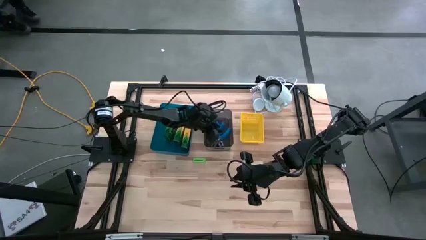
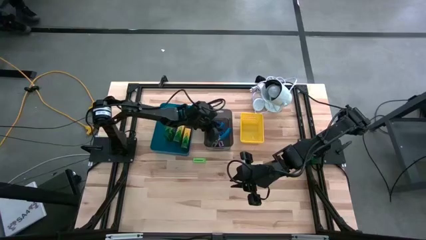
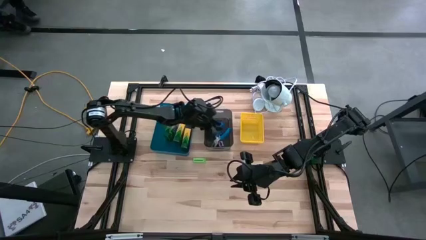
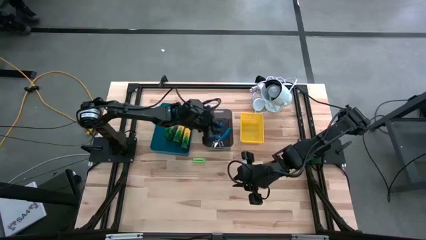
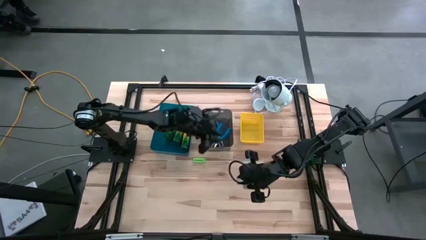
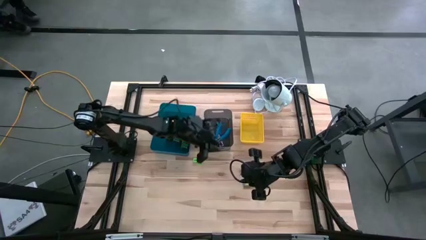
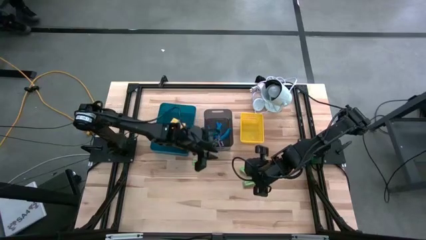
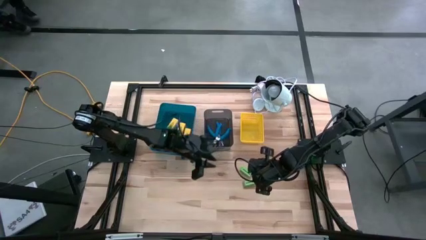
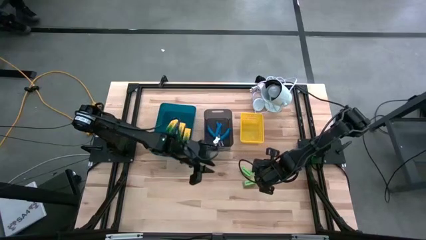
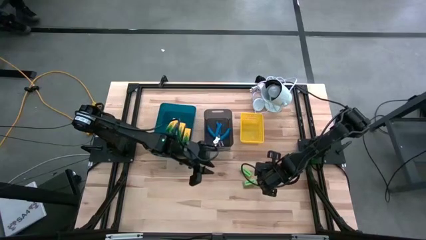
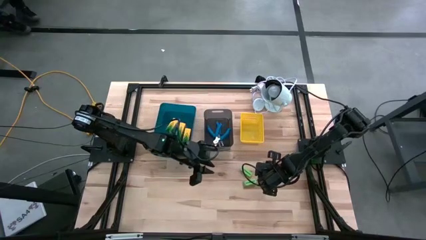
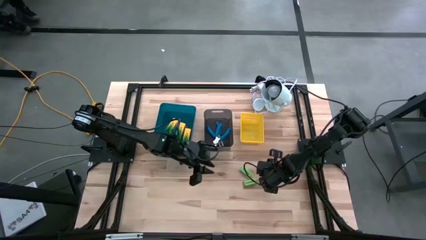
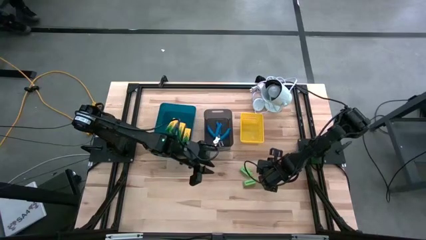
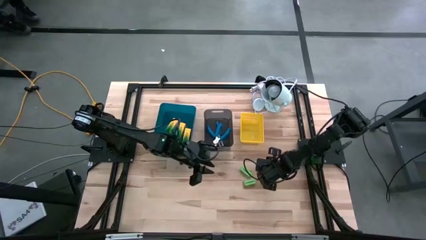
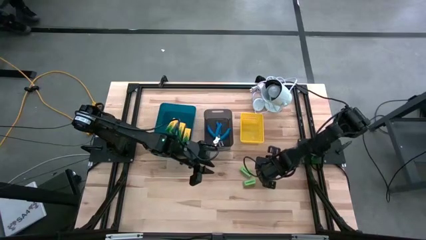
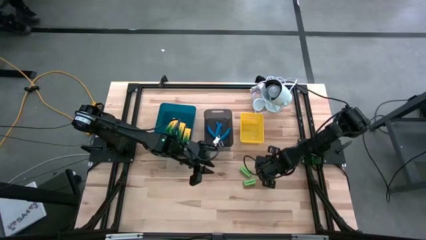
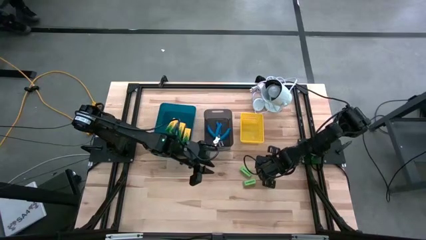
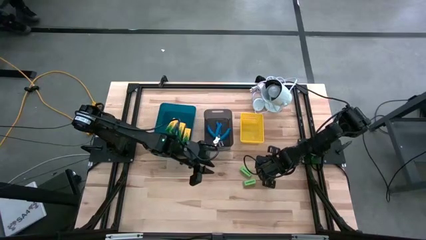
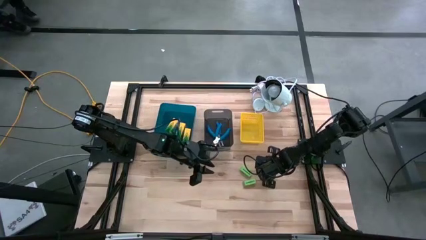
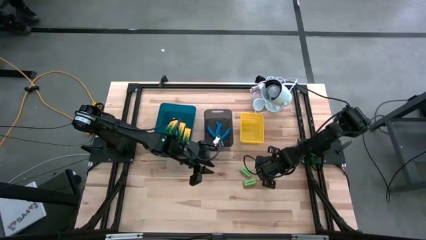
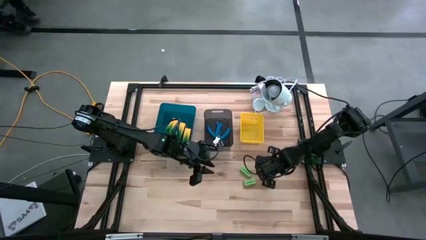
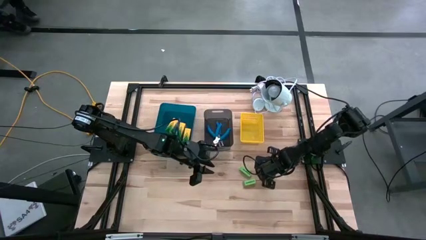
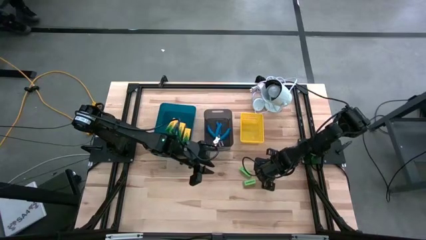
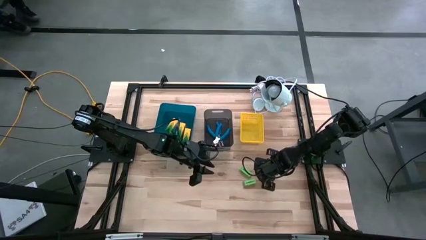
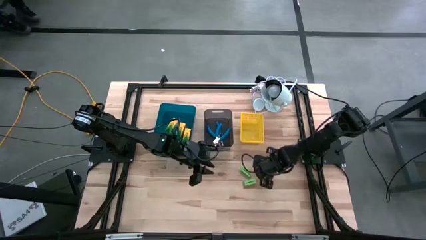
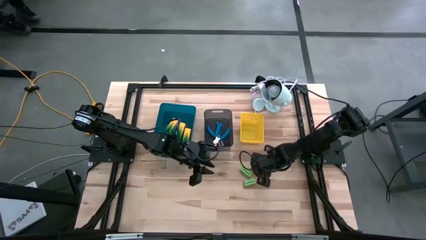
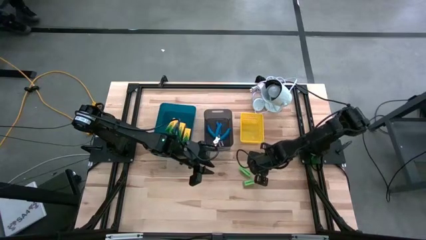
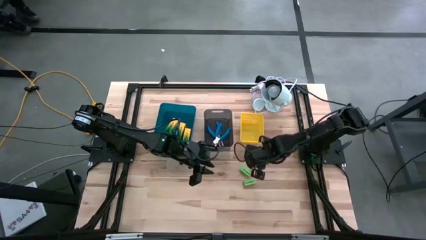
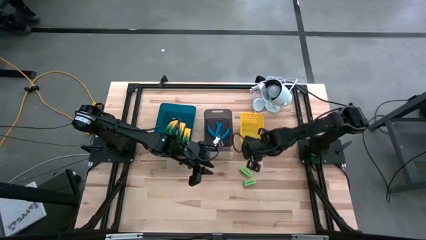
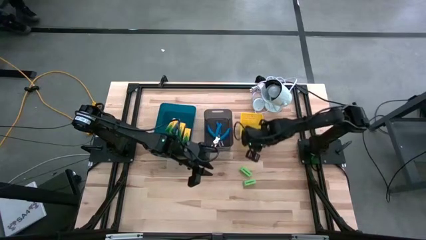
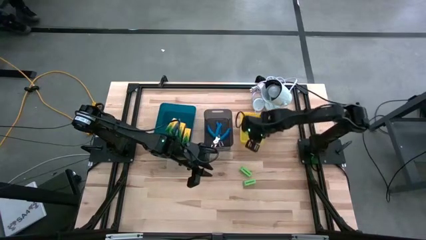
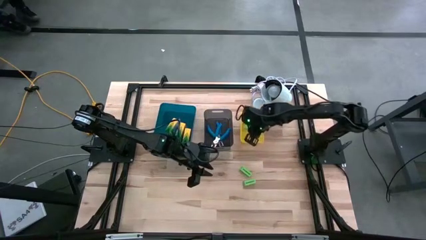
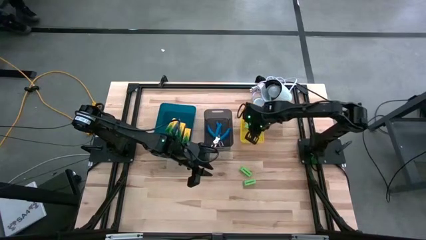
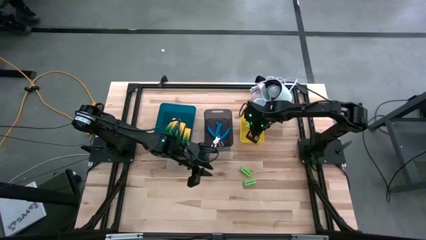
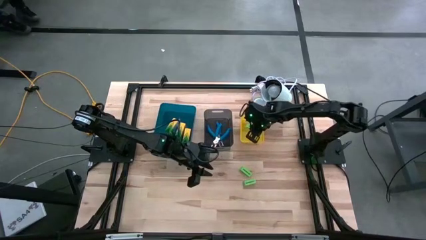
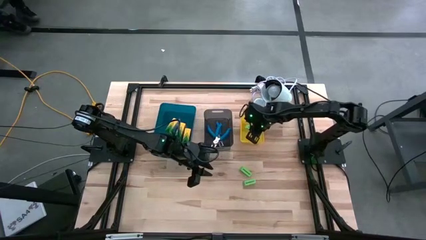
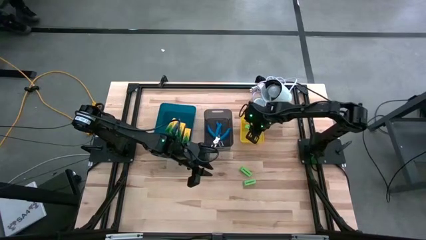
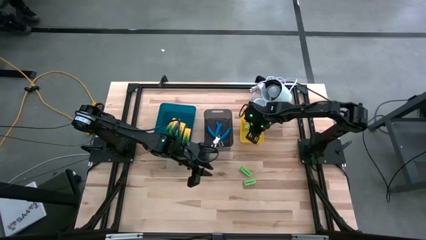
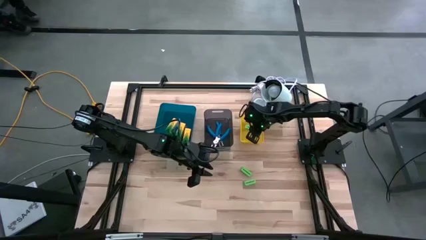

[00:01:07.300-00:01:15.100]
Task: Pick & Place School Supplies
Put the green eraser into the yellow bin

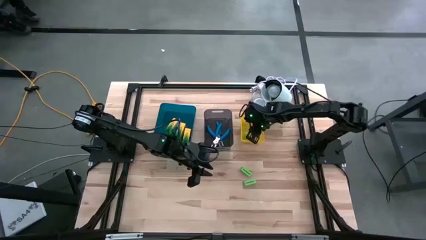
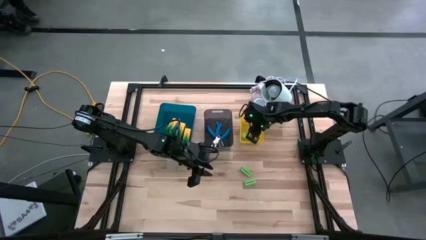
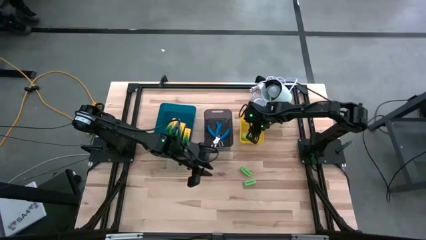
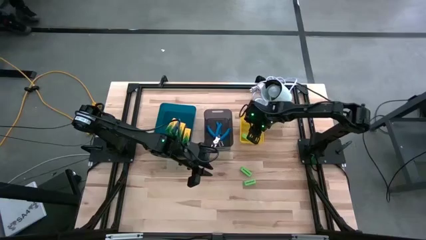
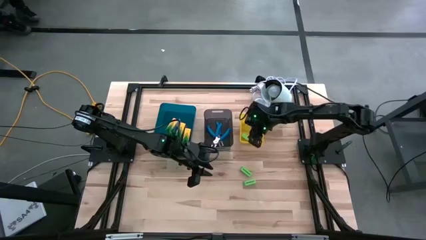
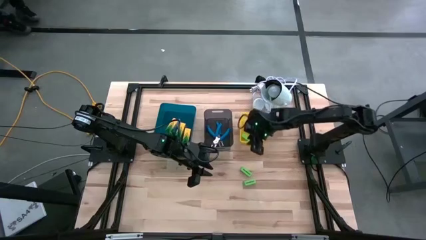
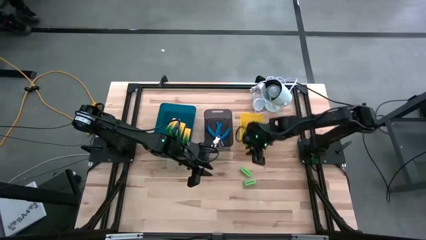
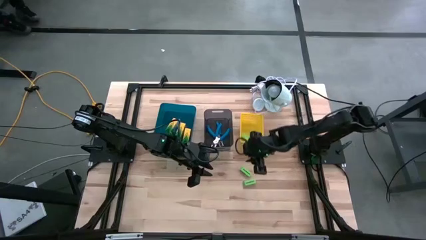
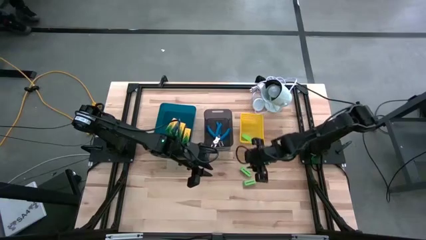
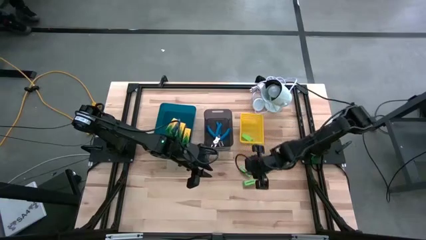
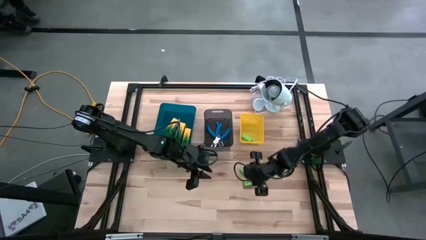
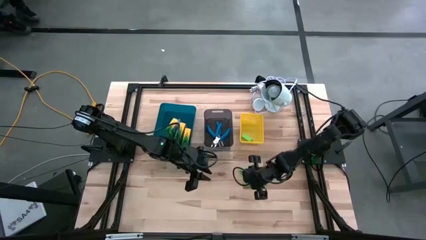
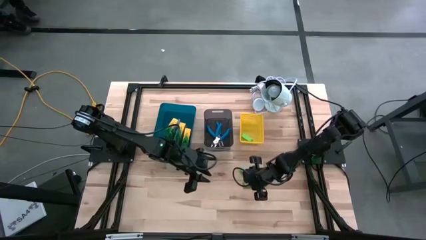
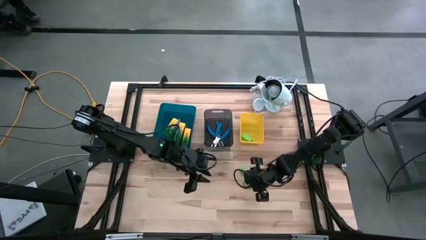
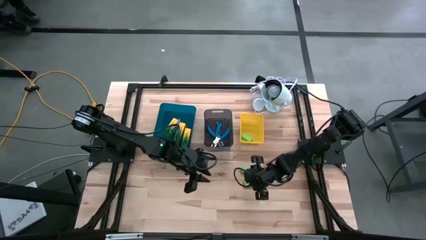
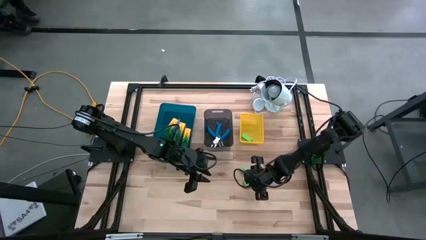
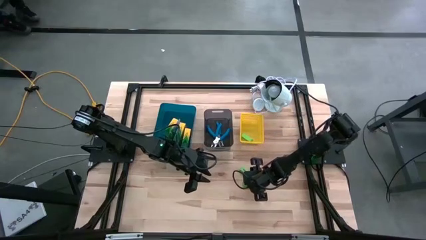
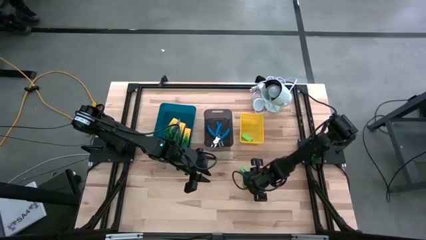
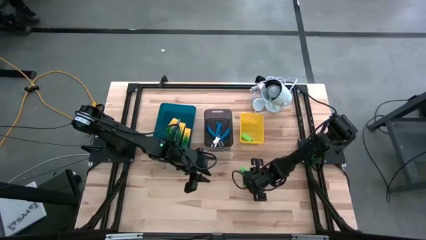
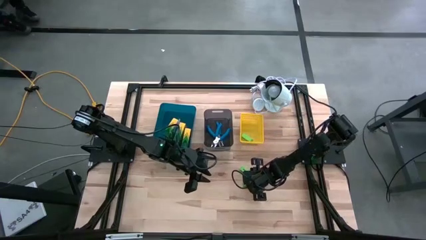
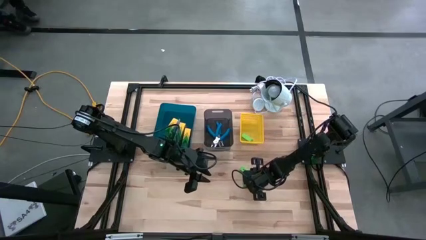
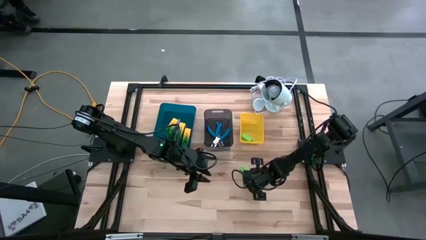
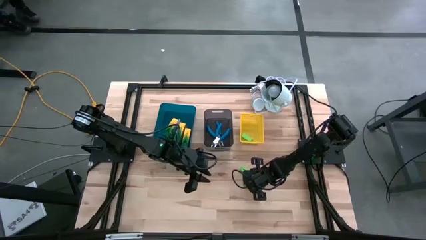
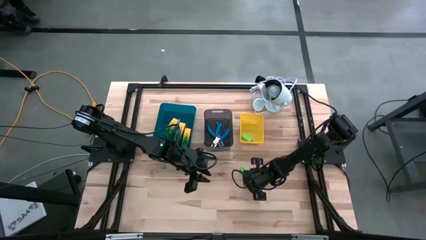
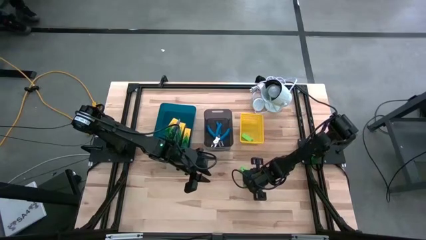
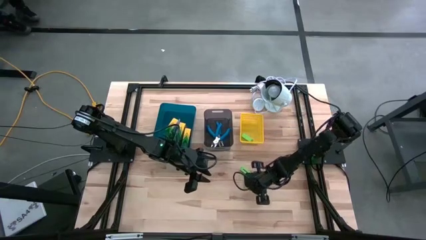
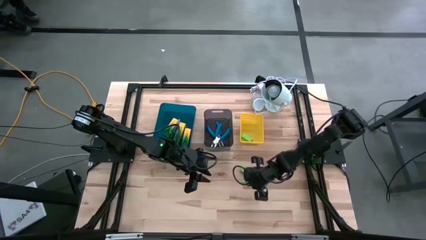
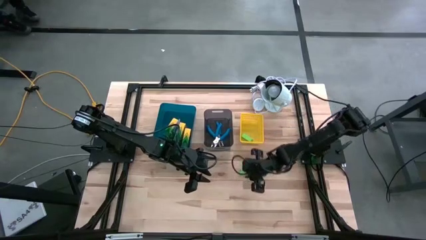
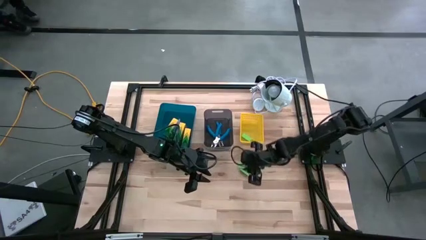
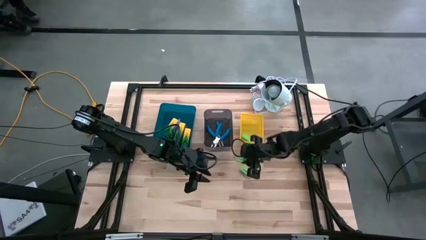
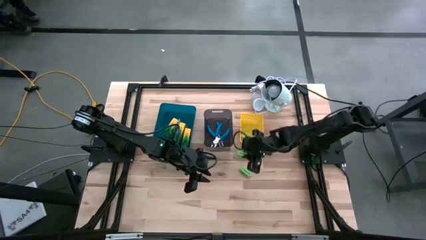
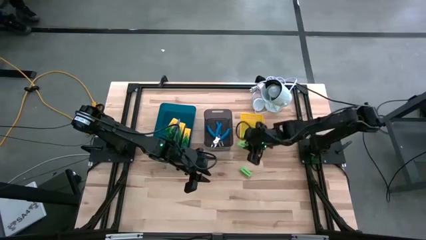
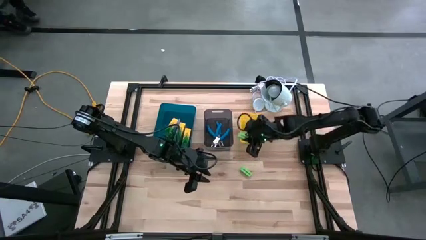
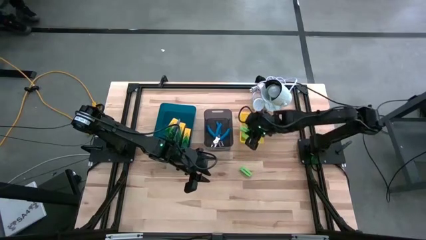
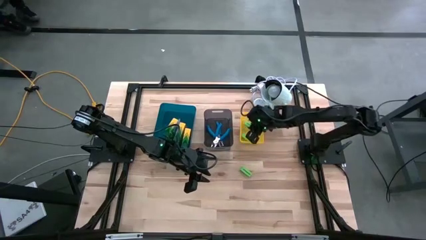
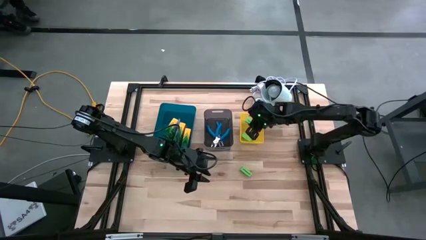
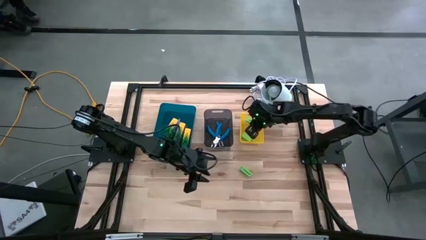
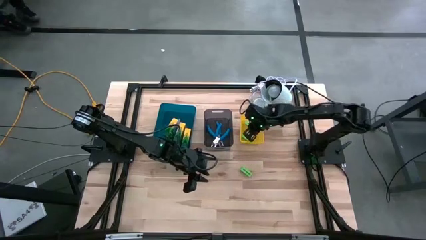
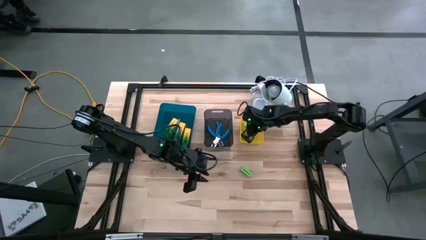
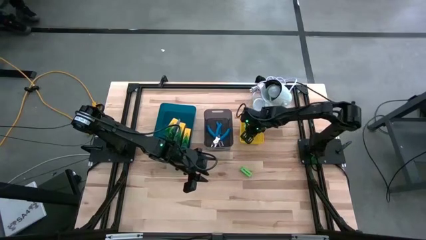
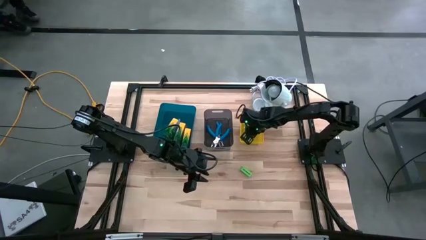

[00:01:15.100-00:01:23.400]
Put the green eraser into the yellow bin
